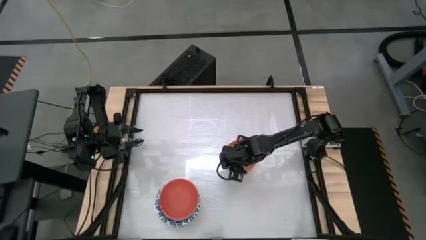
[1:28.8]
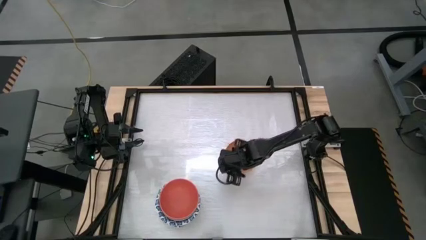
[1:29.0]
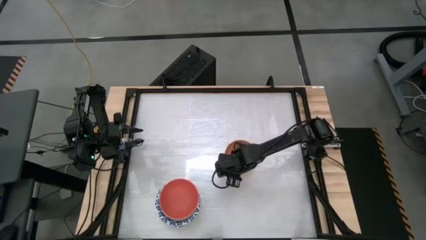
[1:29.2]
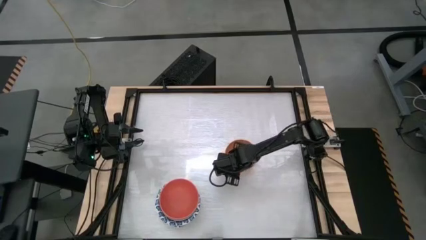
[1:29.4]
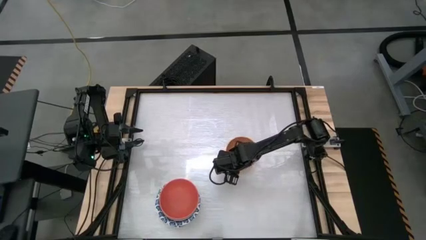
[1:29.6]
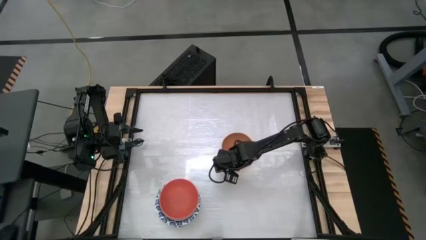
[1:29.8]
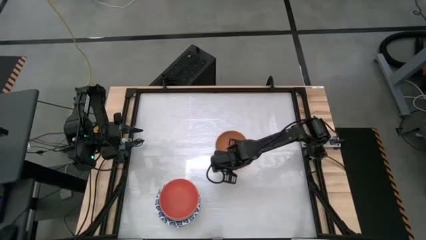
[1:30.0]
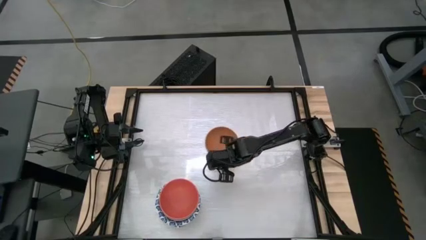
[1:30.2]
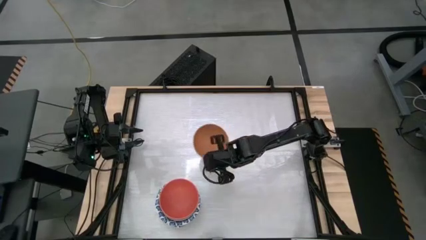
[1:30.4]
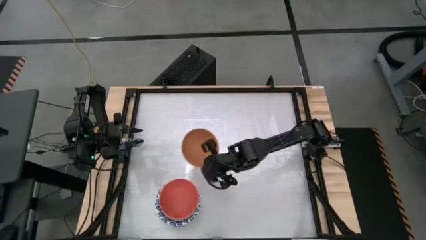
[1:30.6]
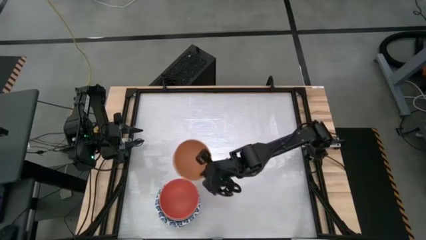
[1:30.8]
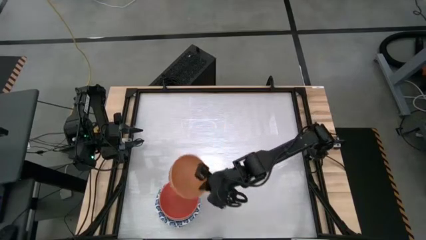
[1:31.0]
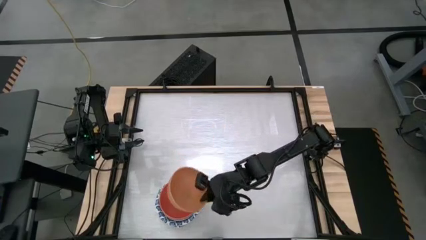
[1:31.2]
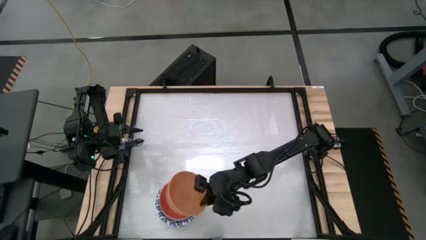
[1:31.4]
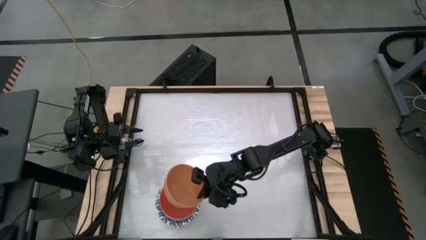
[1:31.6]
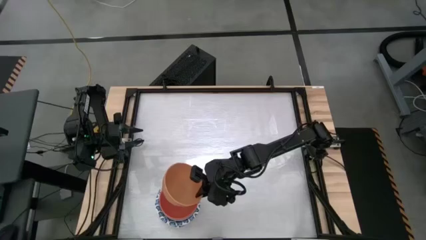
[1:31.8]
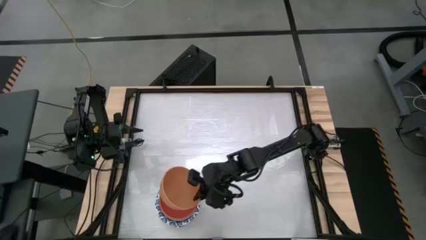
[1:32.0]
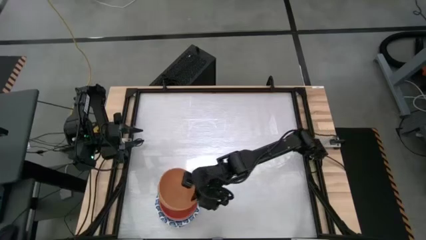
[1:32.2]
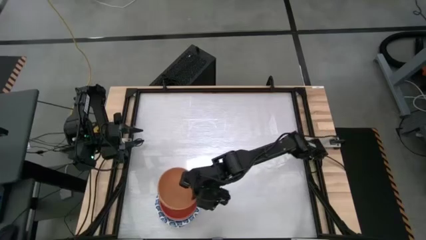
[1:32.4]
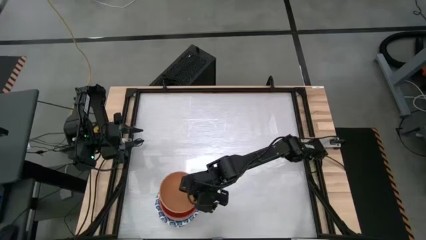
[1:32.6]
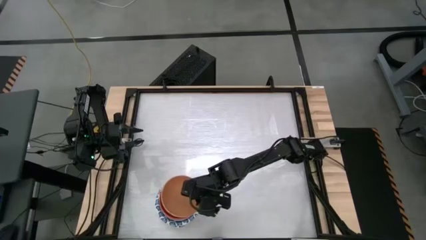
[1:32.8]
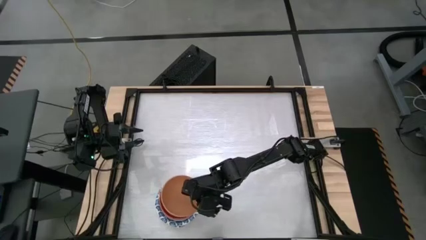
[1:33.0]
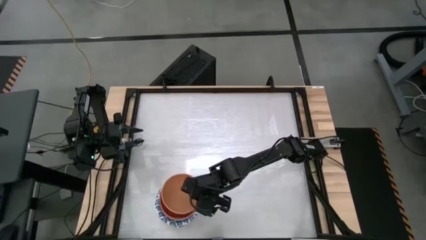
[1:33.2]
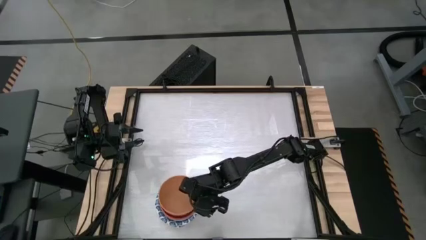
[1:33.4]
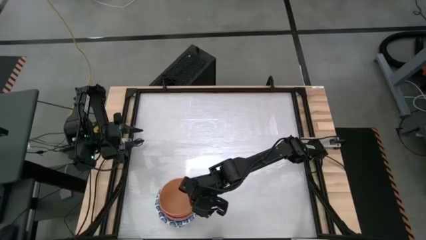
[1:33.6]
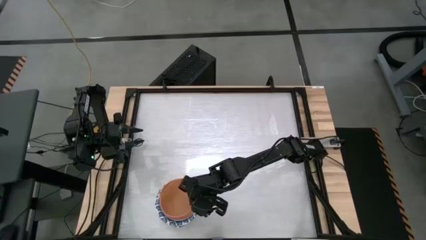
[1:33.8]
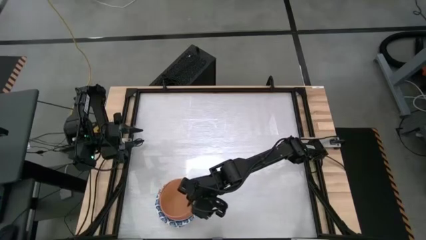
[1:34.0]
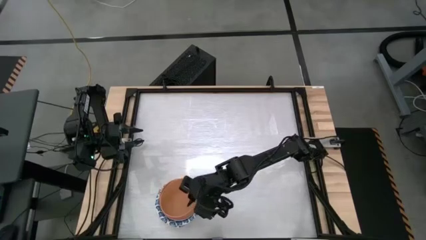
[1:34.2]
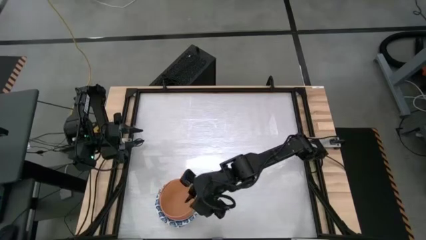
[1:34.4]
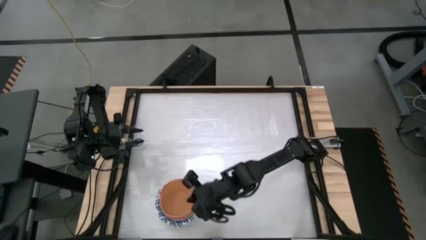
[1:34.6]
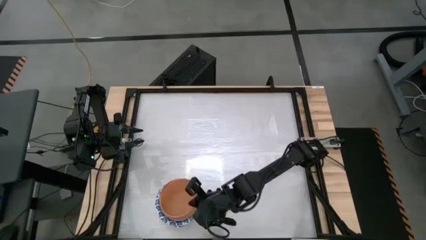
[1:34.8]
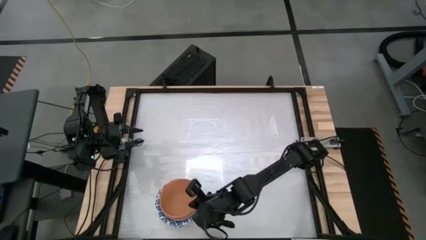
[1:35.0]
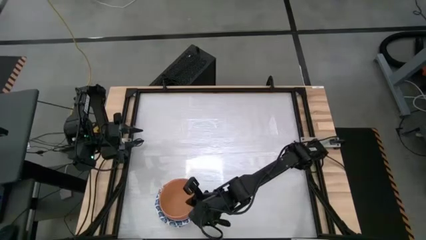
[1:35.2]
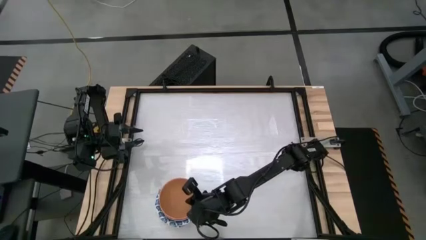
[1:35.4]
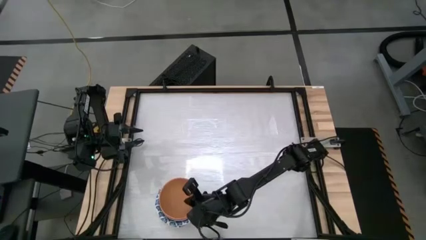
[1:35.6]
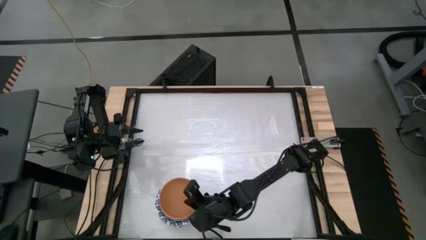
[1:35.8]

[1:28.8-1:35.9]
Stack the light orange bowl on top of the other orange bowl
